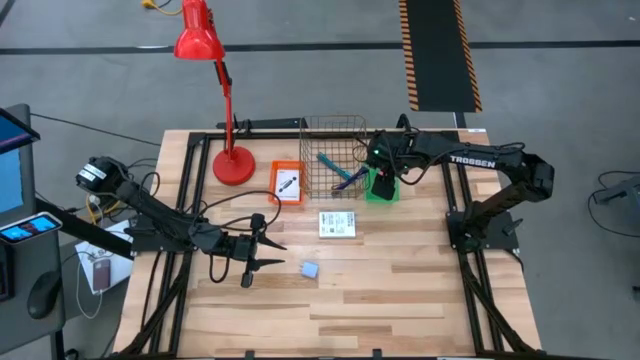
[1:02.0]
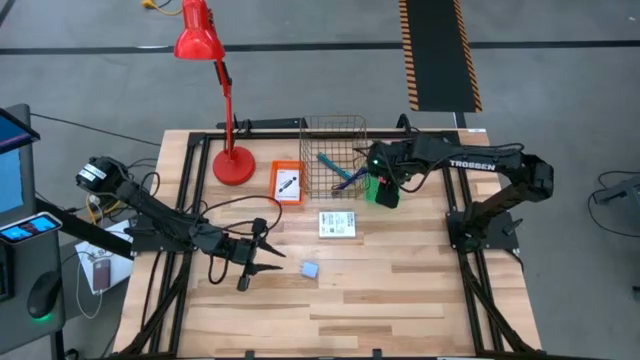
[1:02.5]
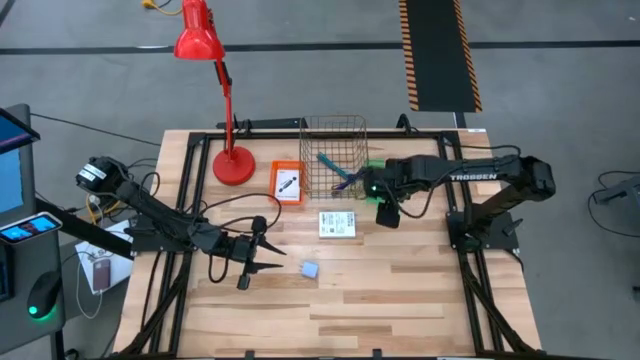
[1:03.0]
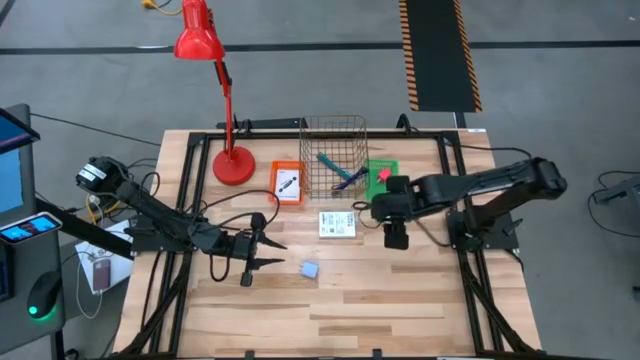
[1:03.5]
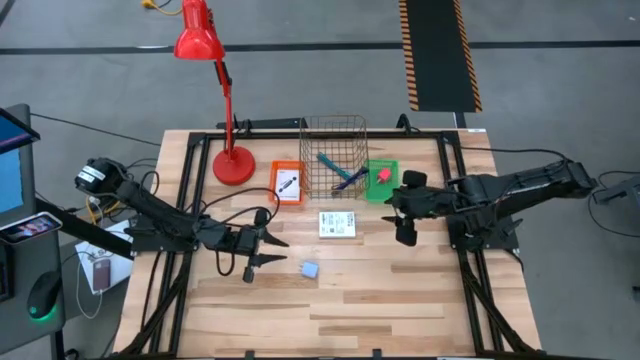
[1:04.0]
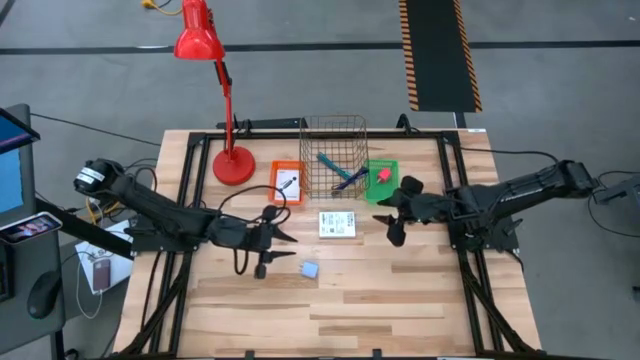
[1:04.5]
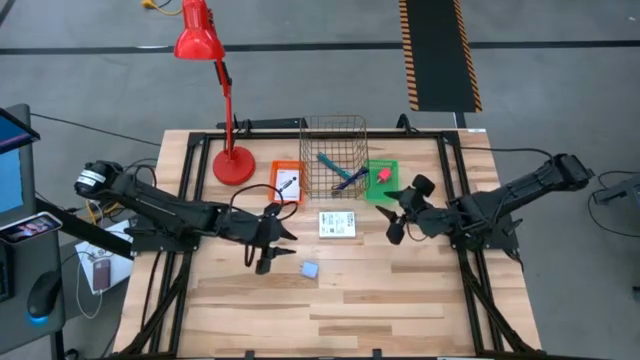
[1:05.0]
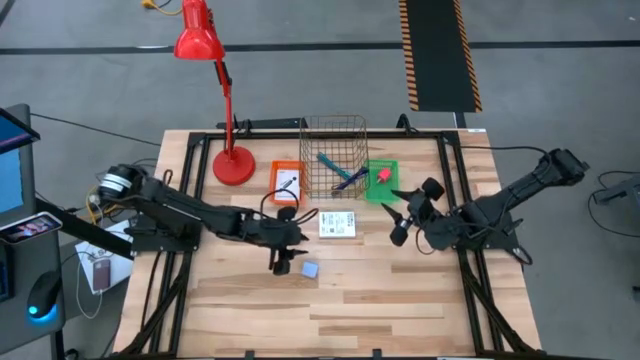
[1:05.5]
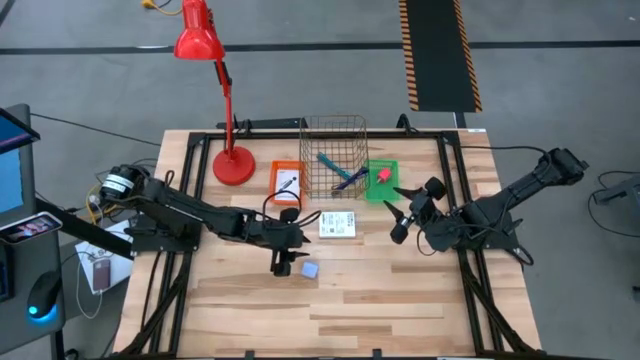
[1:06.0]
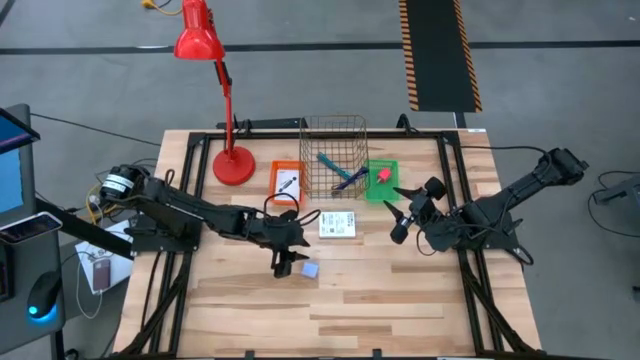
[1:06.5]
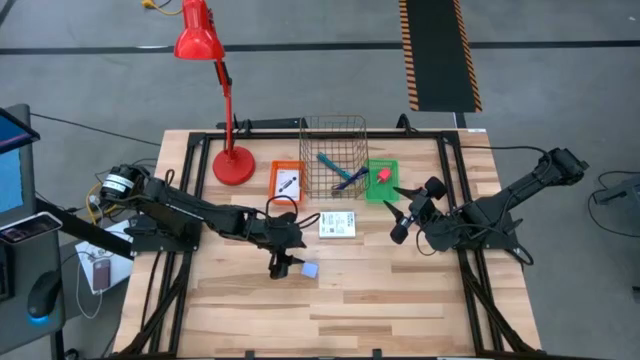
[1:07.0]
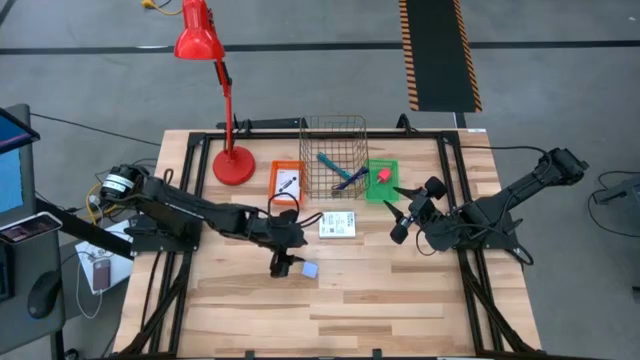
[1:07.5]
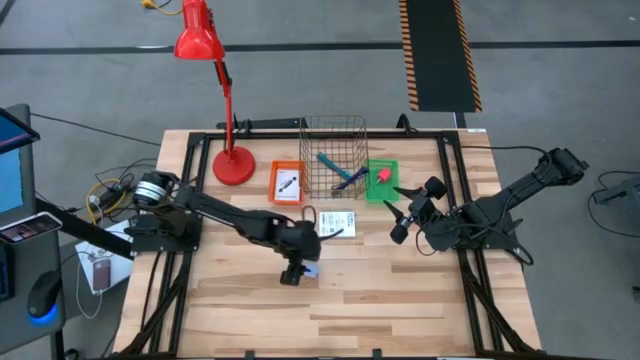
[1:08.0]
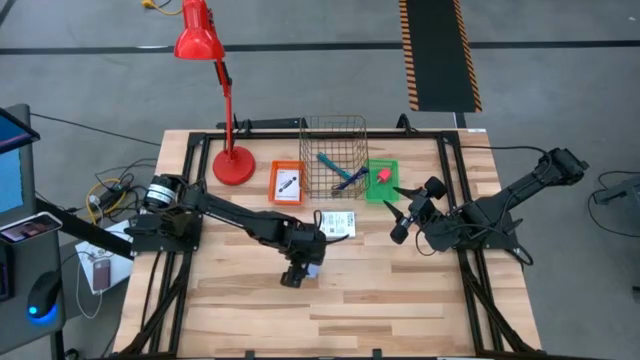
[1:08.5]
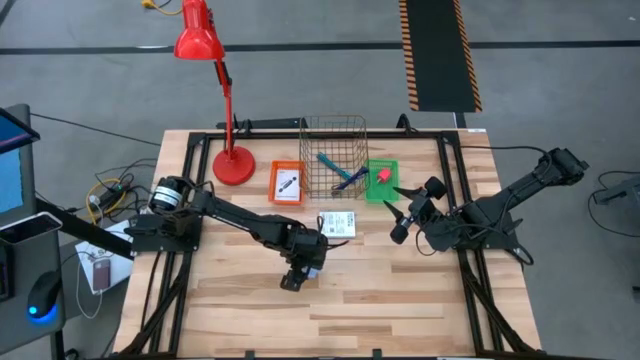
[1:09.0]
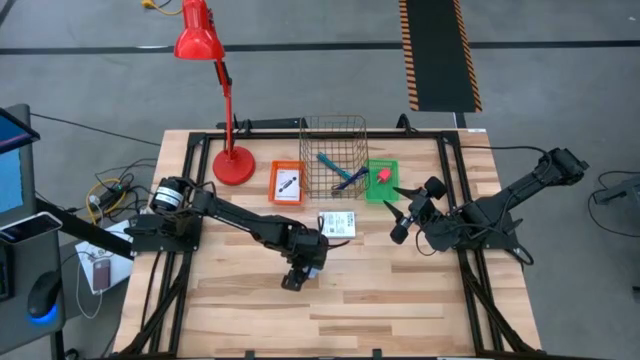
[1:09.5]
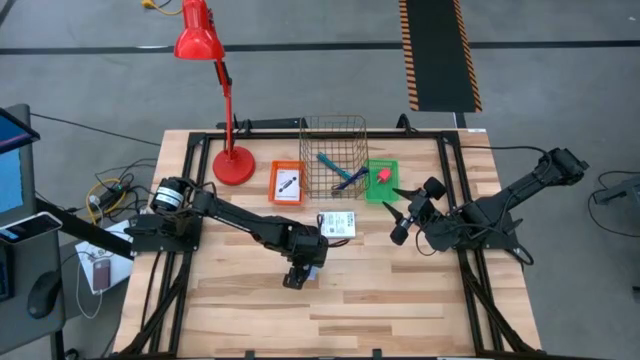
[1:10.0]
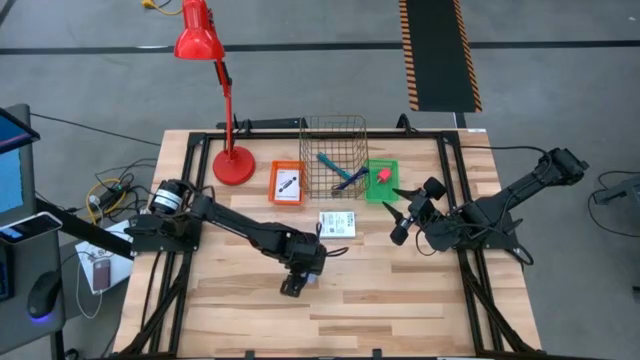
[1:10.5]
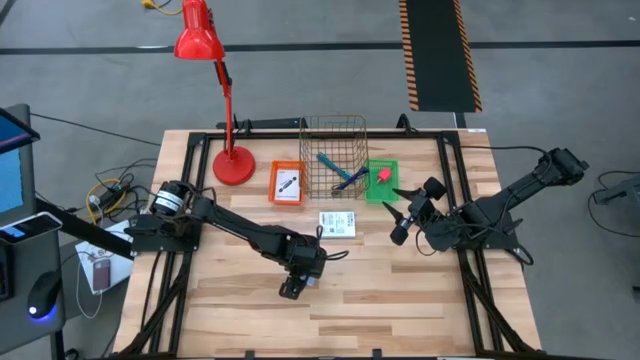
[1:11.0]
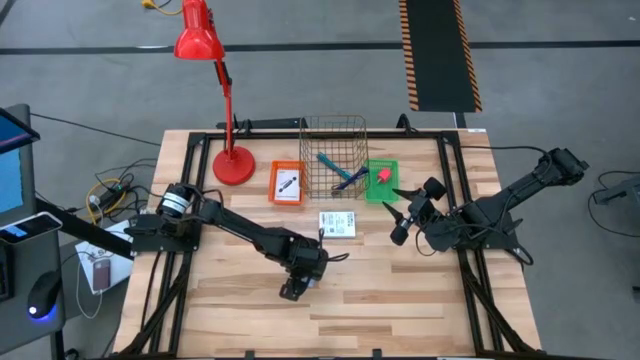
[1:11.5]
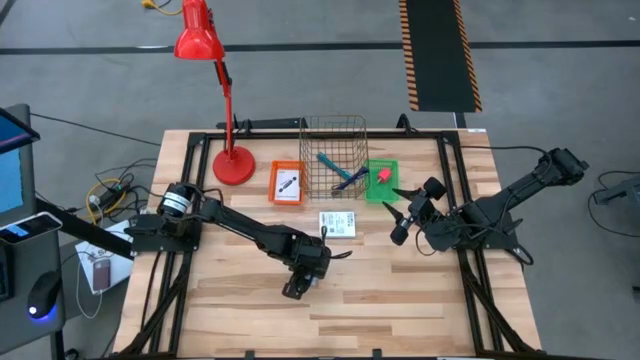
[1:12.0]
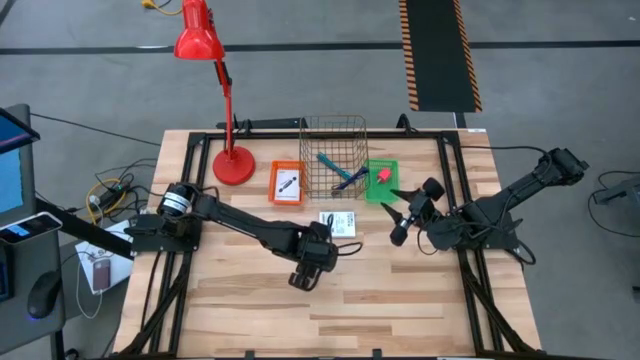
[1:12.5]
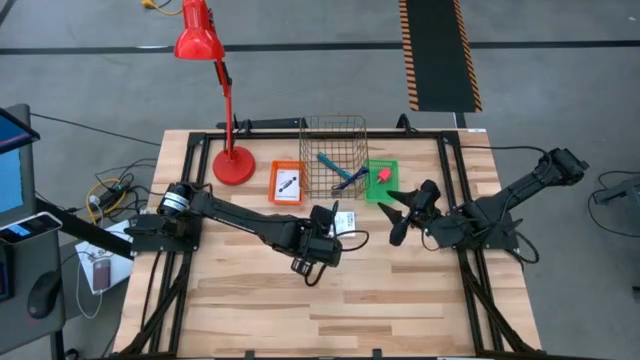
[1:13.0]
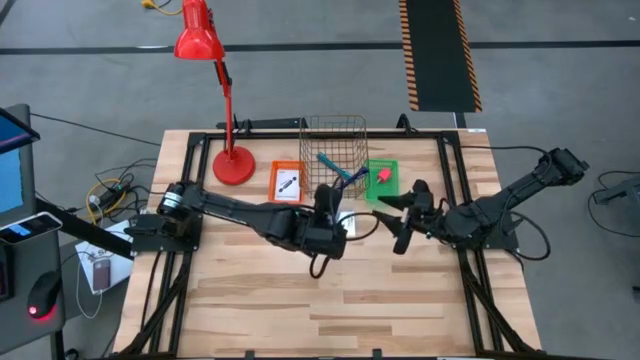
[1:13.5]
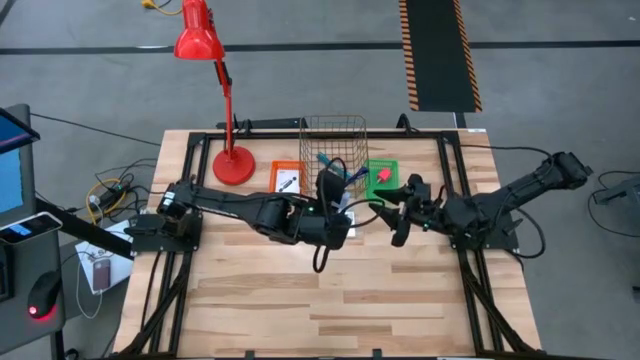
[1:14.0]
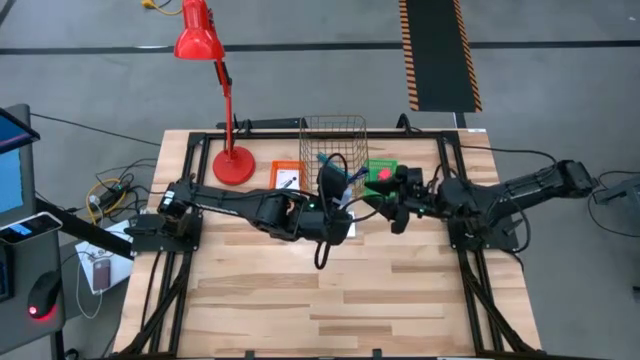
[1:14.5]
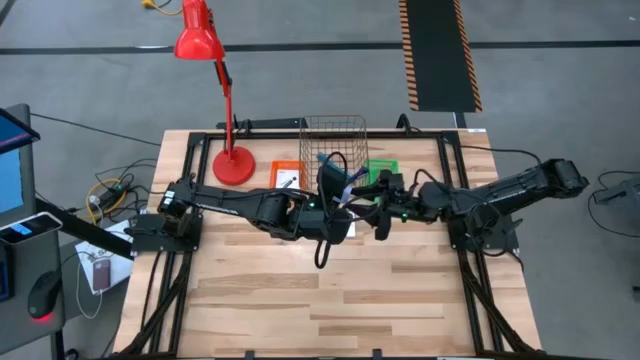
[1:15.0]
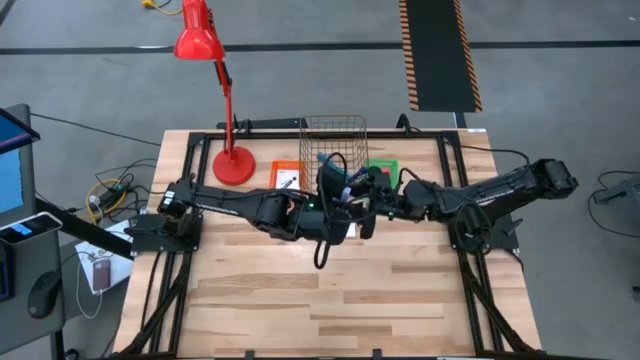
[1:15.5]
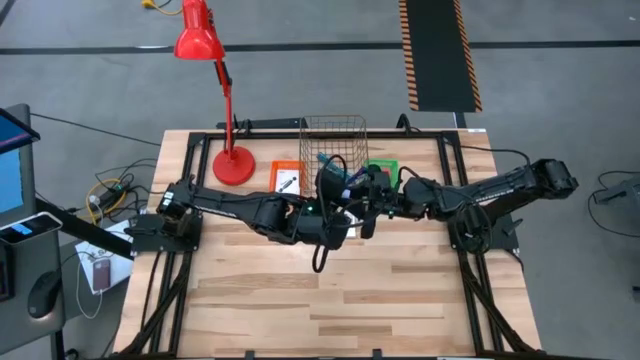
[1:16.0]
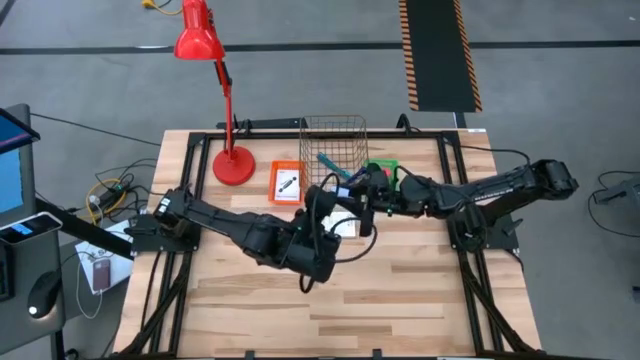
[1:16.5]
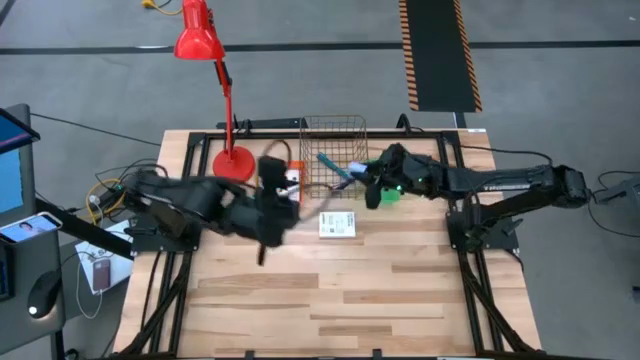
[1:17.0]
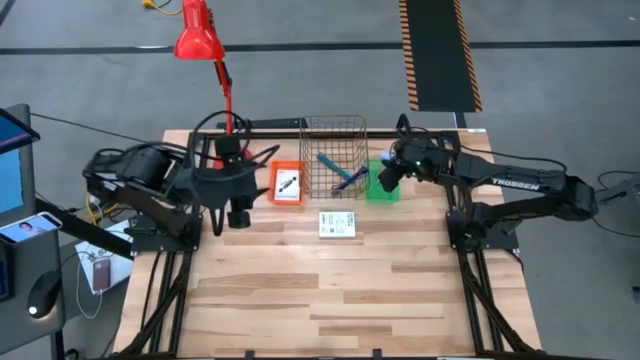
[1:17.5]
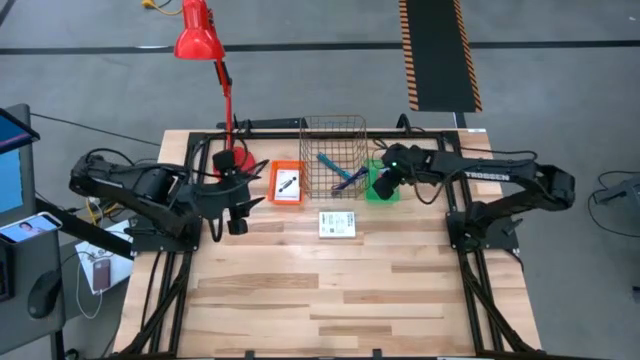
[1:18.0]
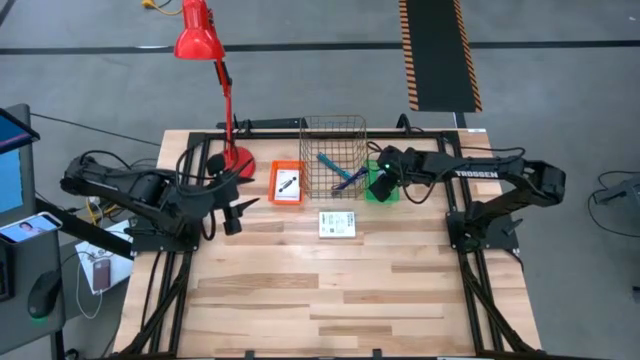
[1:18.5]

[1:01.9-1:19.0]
Task: Pick and place items into bin
Put the white charger adapter into the green basket

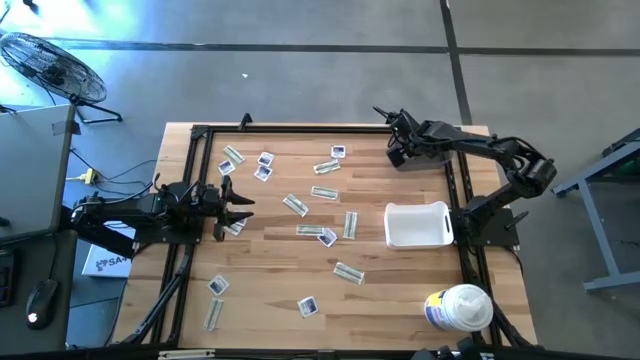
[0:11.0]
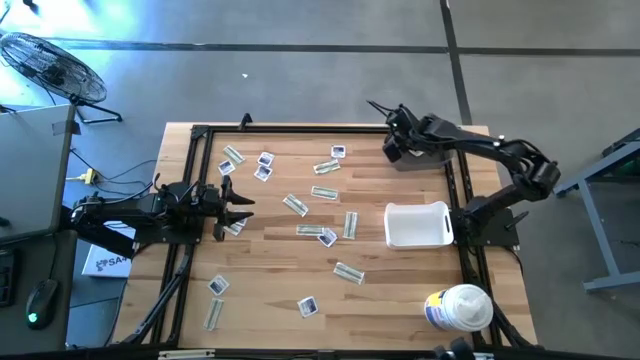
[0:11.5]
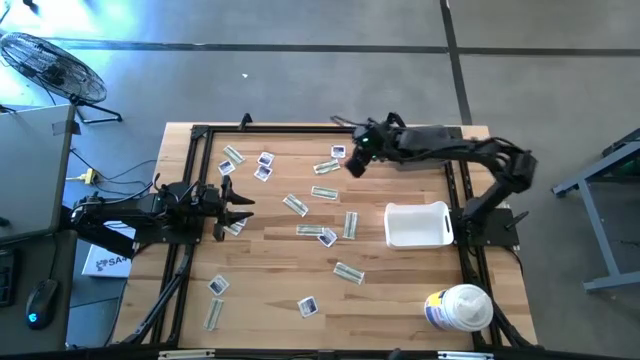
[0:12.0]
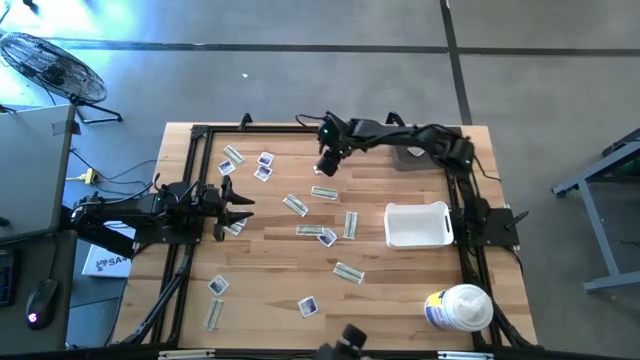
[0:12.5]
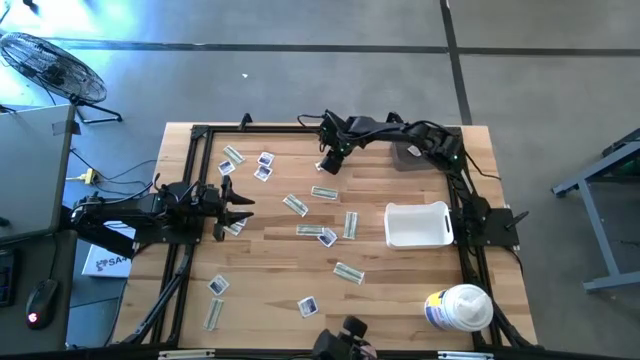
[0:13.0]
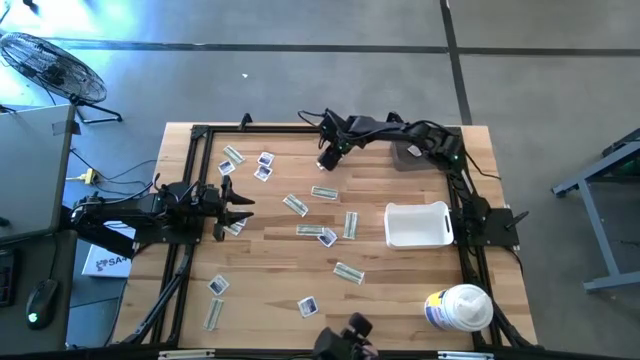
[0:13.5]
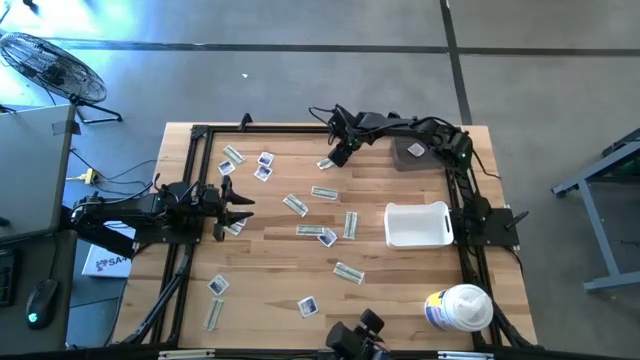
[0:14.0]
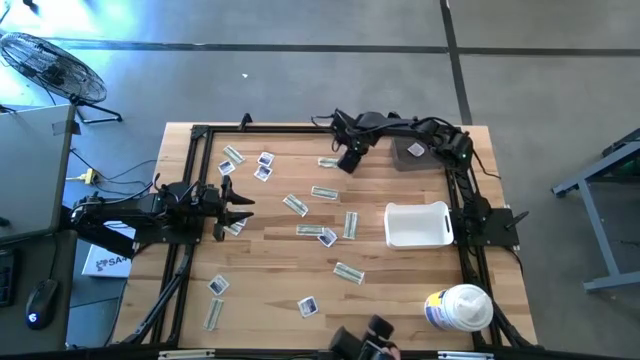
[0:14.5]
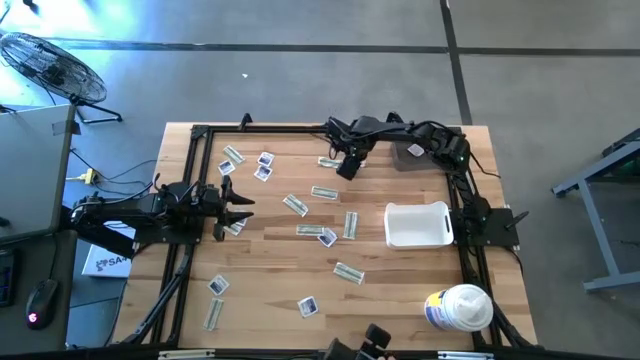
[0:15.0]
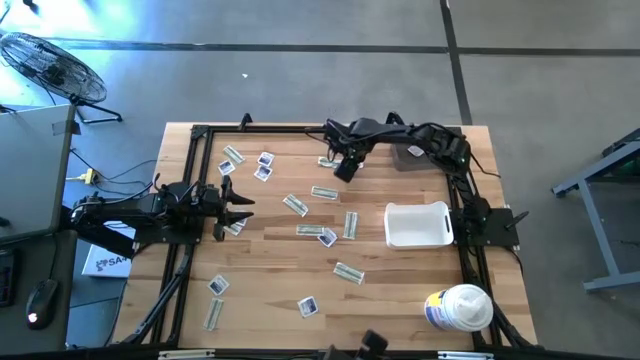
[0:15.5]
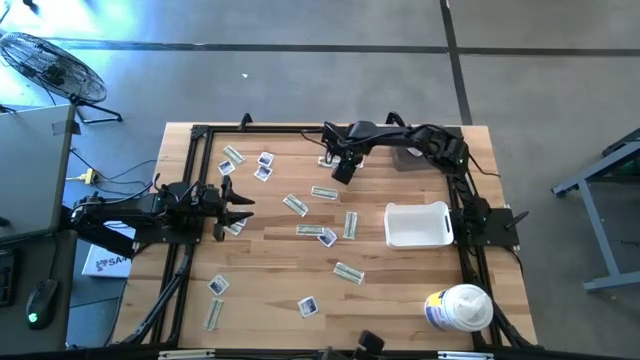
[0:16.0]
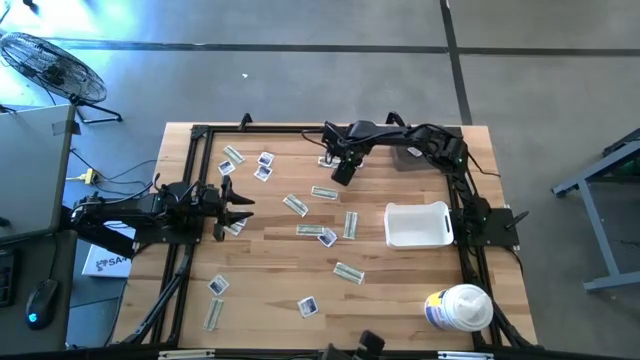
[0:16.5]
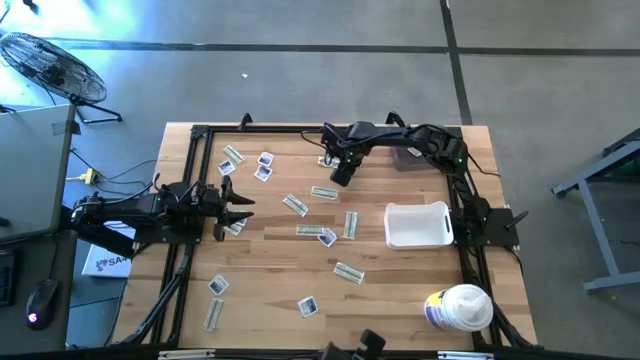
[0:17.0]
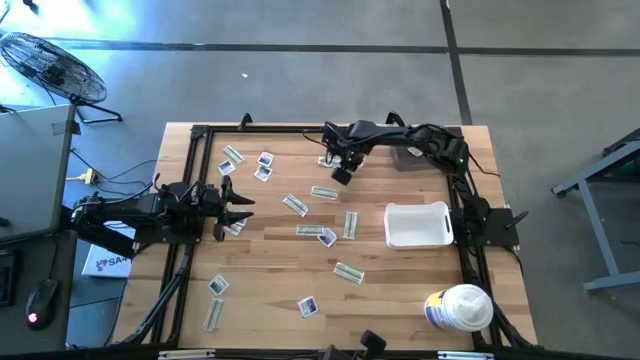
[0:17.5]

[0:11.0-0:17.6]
Task: Pick & Place First Aid Supplies
Put the alcohol pad into the black bin
